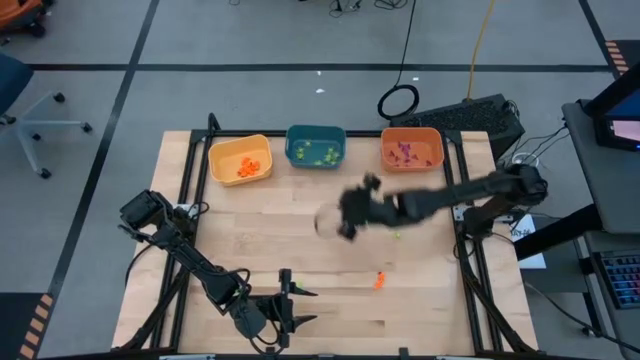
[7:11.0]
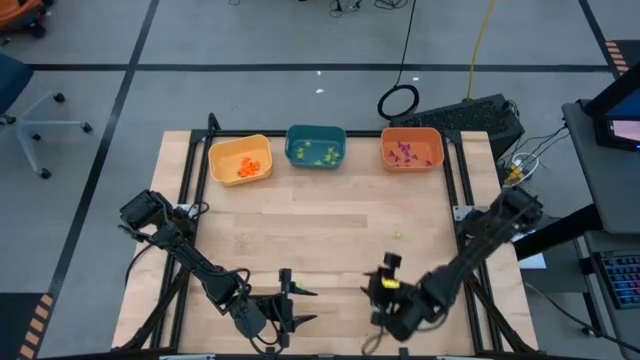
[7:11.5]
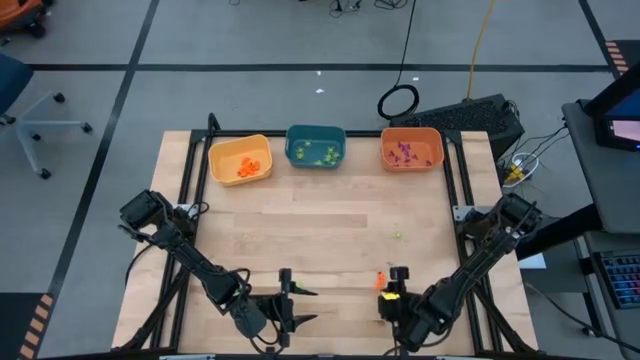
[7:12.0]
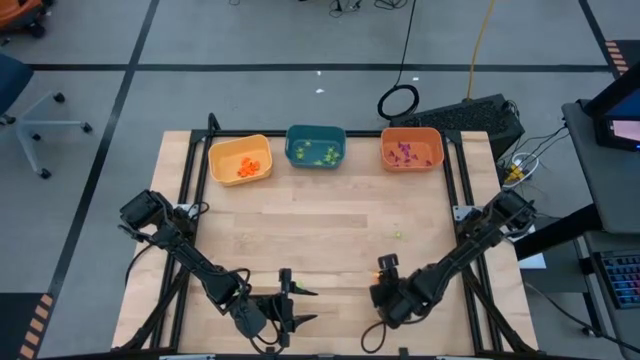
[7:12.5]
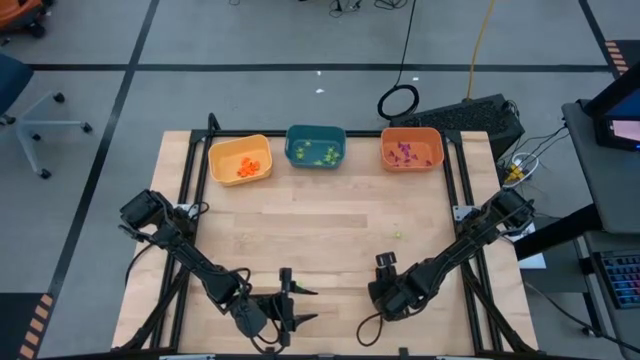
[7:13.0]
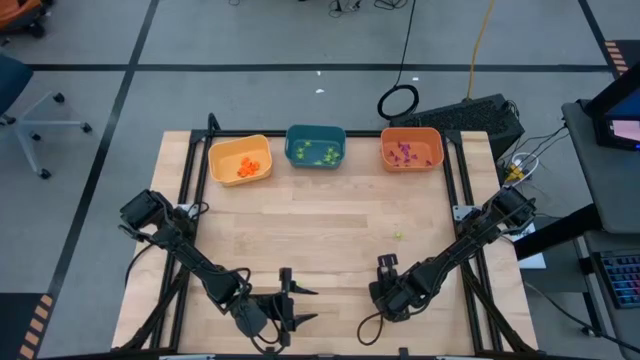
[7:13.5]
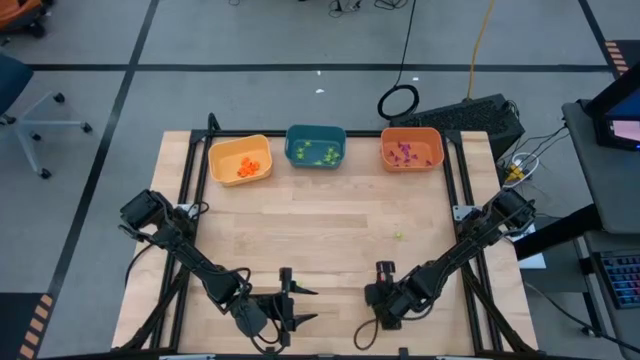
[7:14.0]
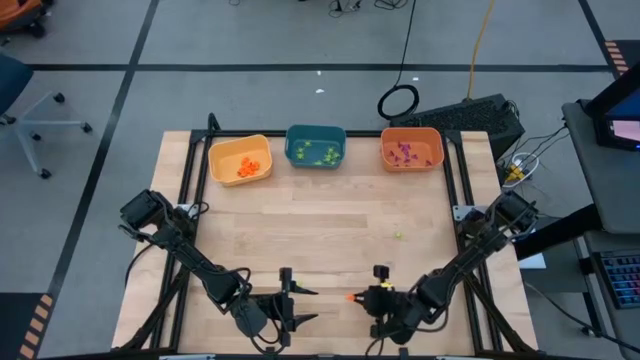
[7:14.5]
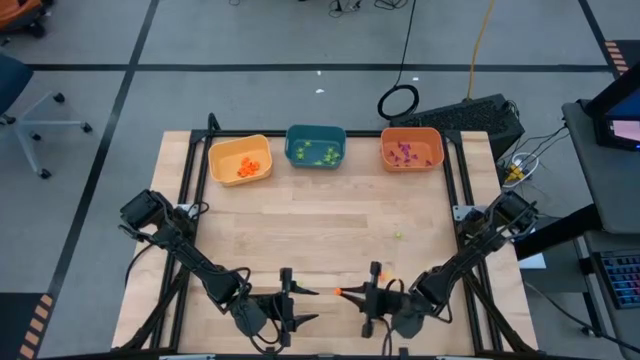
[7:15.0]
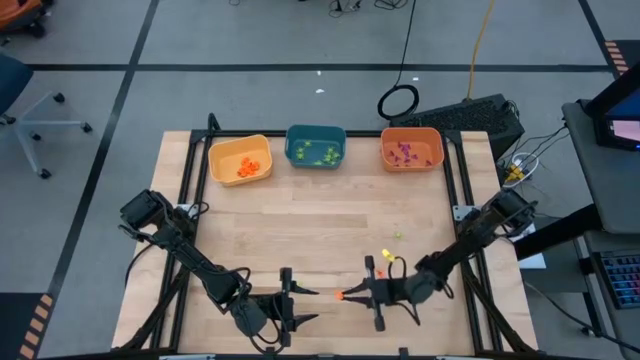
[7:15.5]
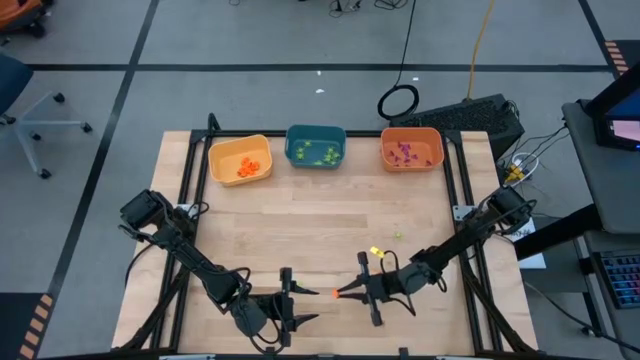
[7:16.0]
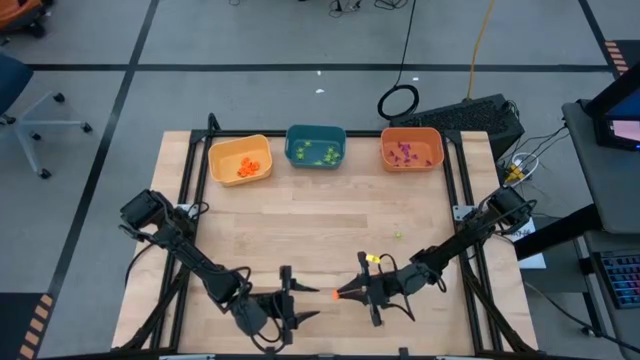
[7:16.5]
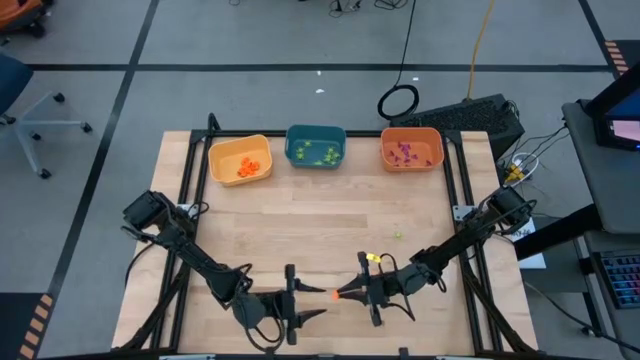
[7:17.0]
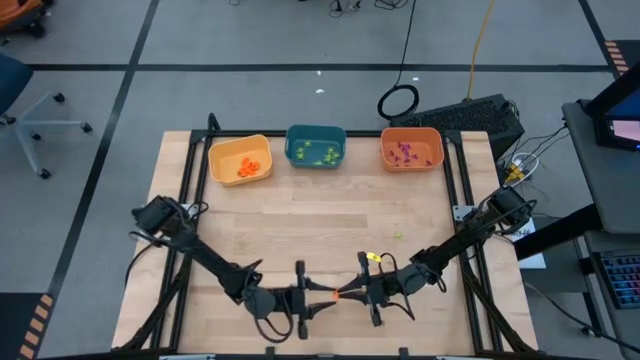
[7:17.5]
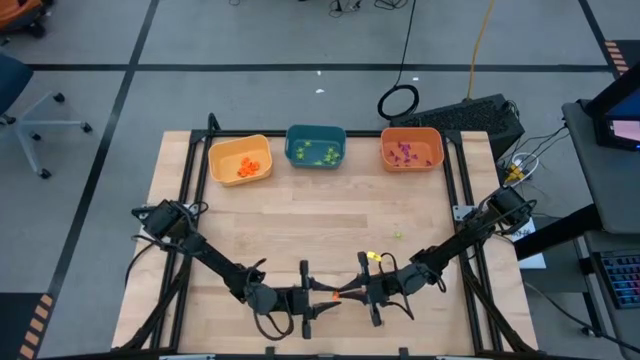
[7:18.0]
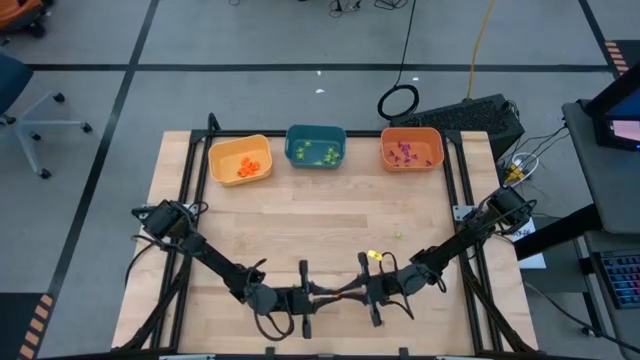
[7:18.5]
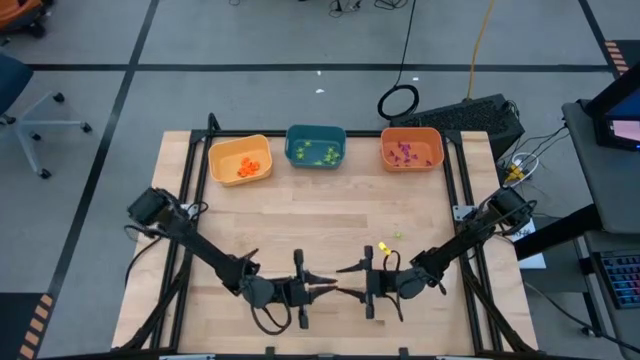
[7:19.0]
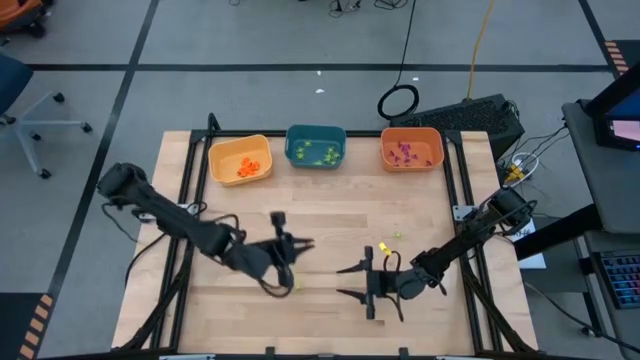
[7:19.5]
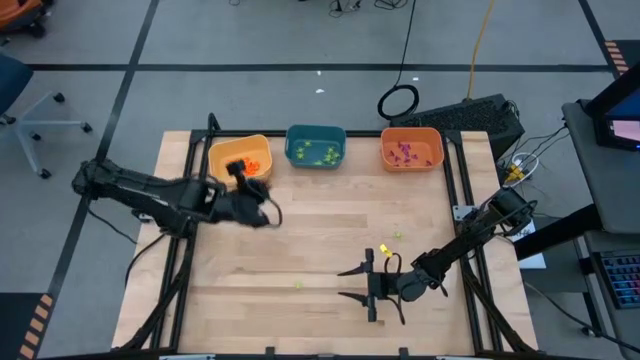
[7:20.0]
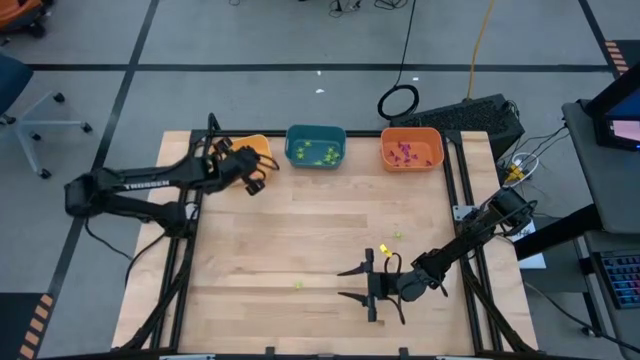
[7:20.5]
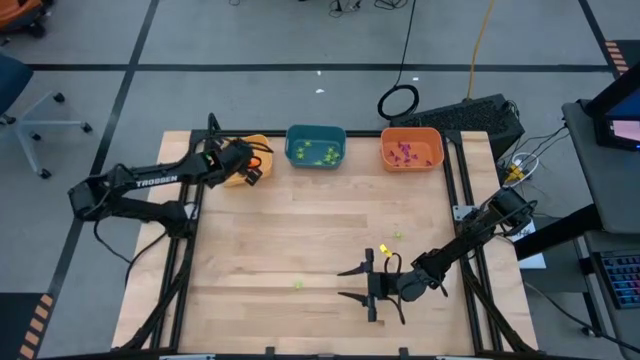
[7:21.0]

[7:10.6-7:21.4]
Task: Sort Halloween decoration
Put the orange skeleton toy into the yellow bin

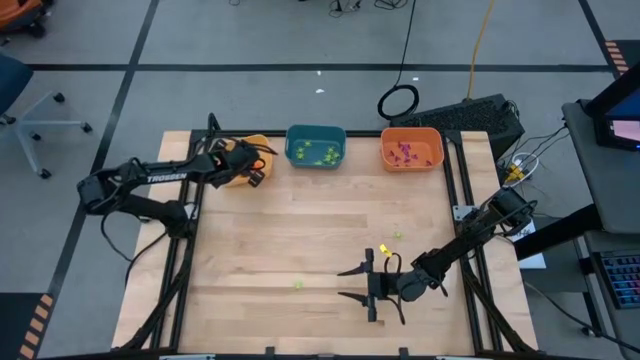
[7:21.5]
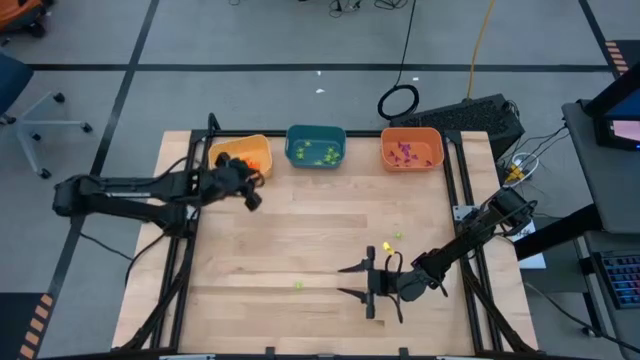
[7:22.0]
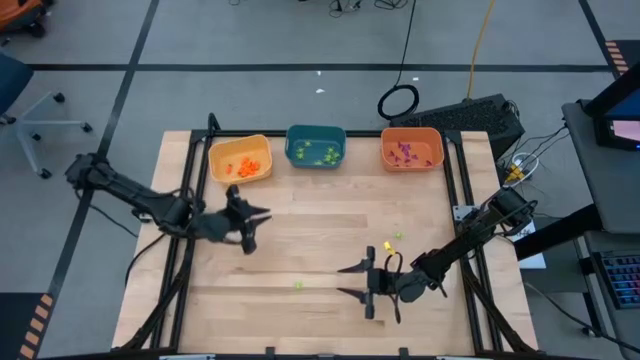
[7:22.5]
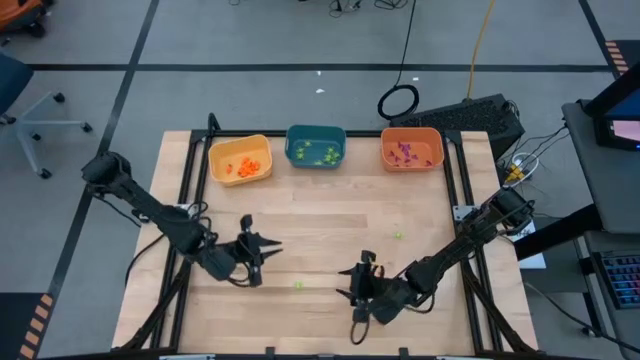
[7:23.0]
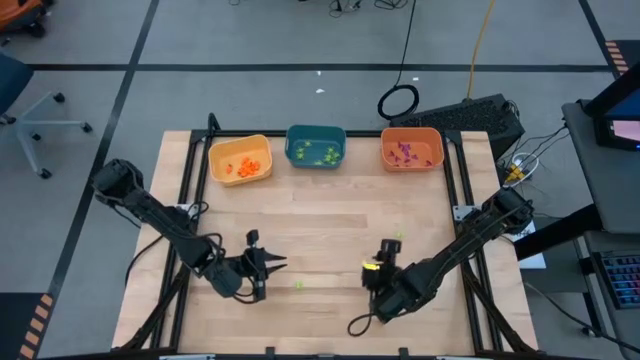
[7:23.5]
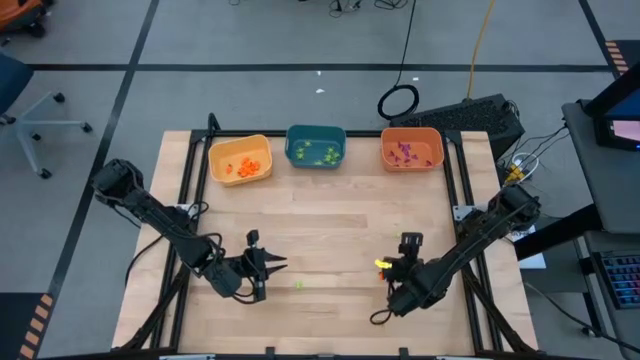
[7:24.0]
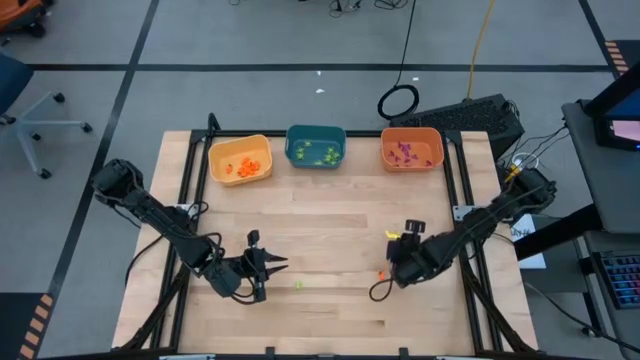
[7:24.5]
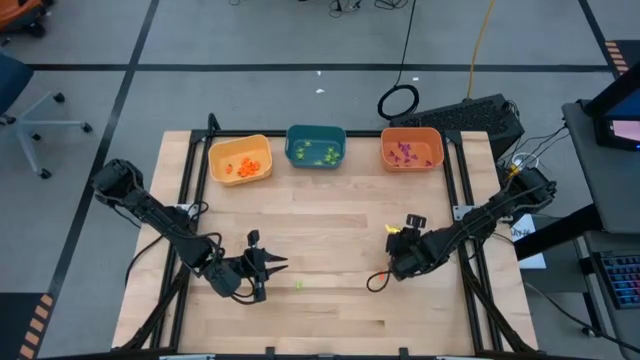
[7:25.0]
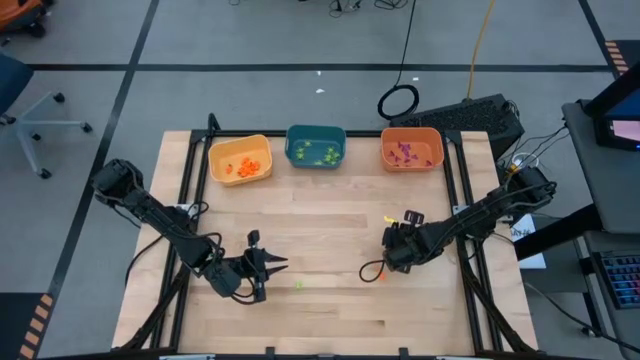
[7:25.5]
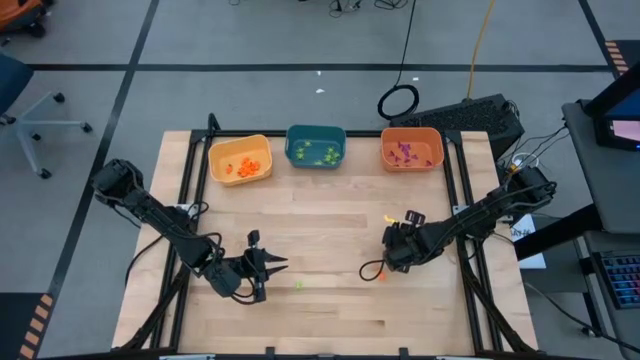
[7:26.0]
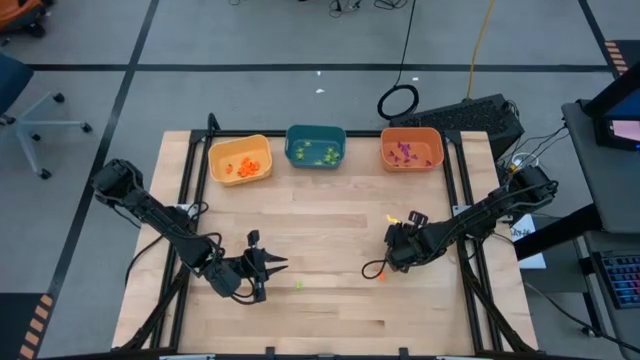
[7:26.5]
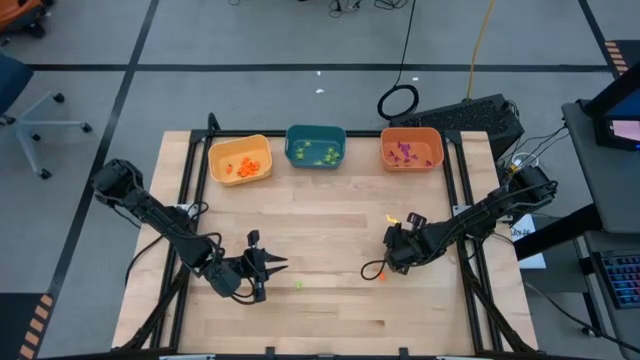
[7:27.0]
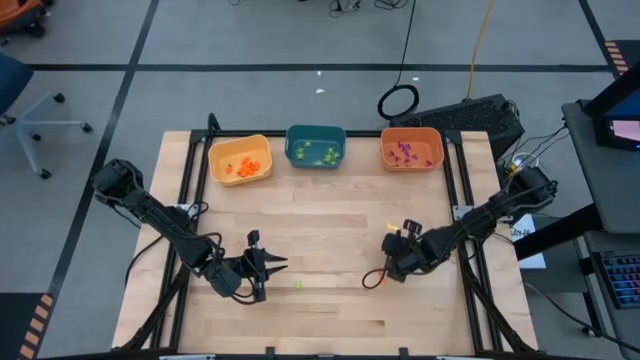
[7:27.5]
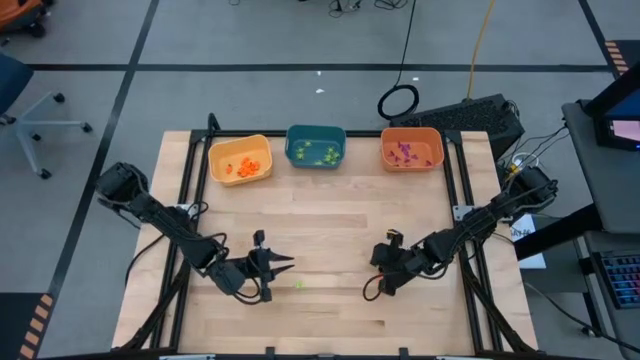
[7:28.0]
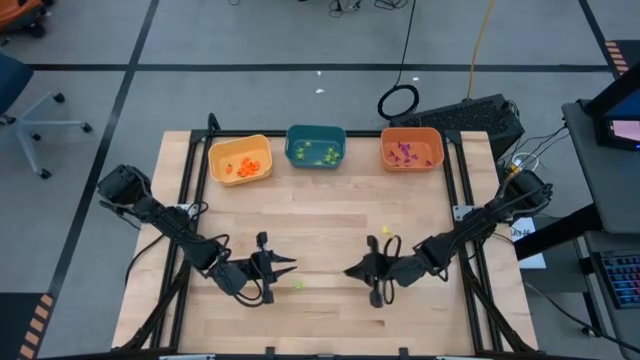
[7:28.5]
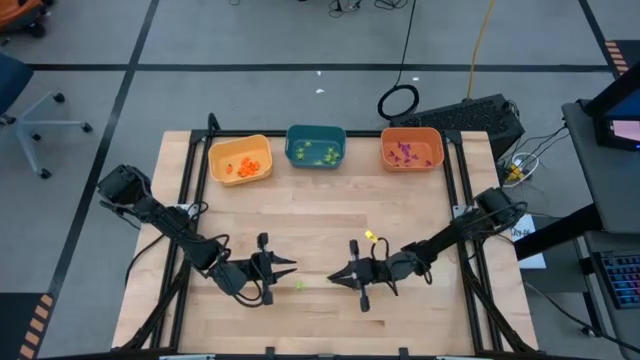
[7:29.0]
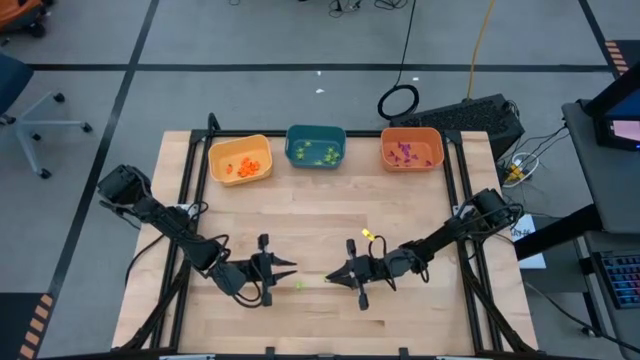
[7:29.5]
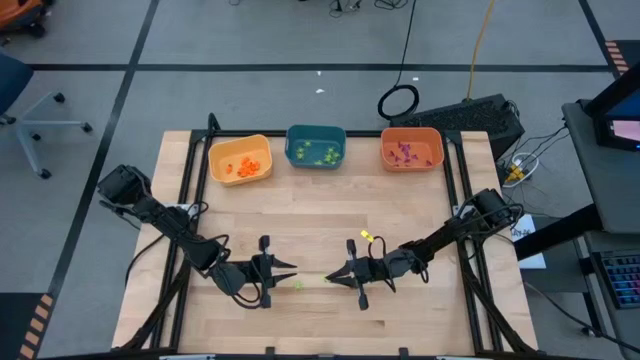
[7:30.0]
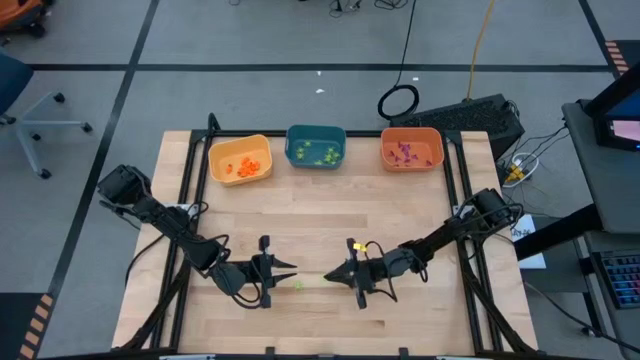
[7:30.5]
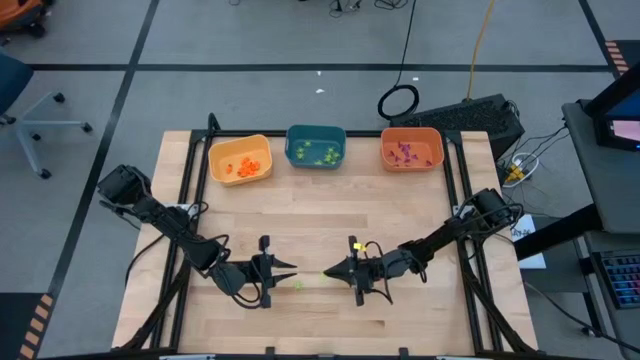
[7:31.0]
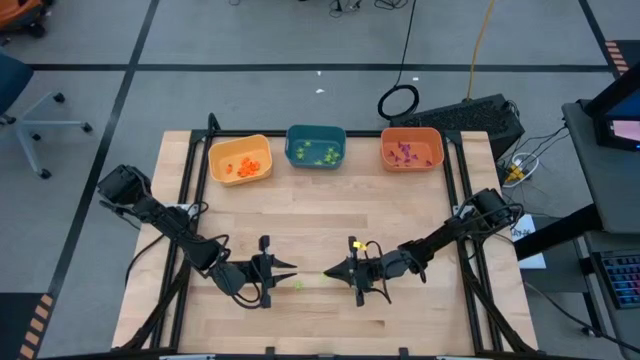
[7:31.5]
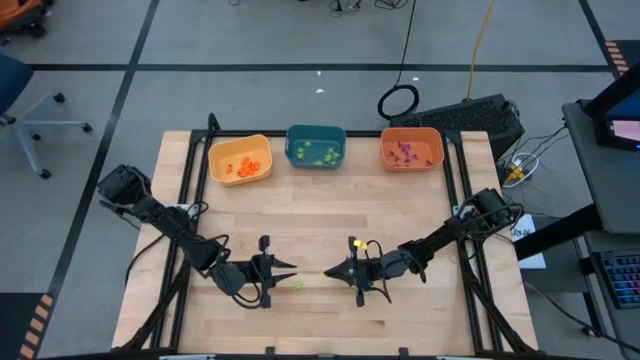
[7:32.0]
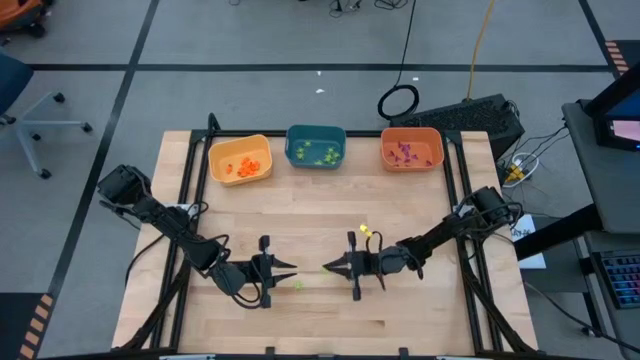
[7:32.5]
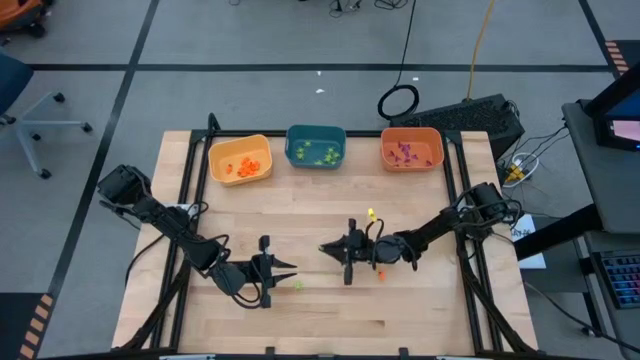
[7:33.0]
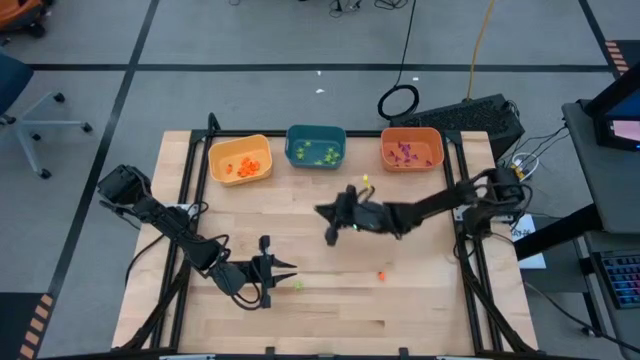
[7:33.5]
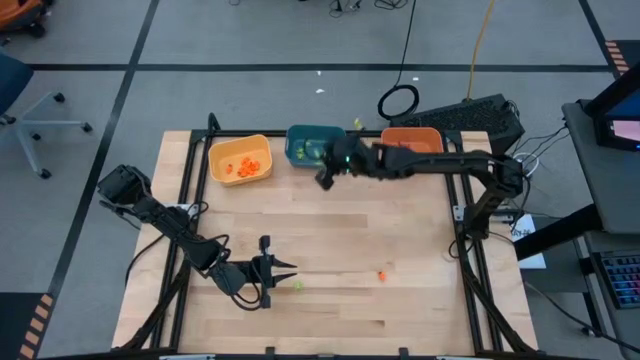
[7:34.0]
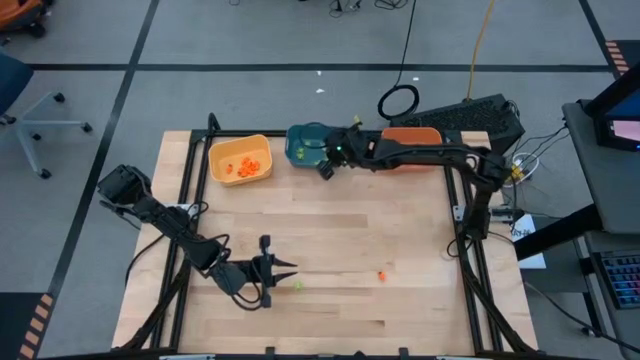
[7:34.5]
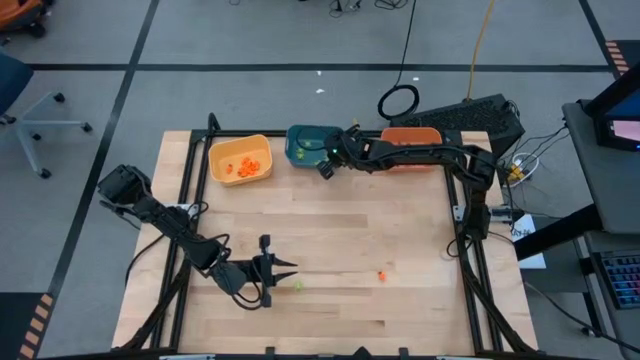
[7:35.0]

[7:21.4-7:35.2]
Put the green spider toy into the blue bin
